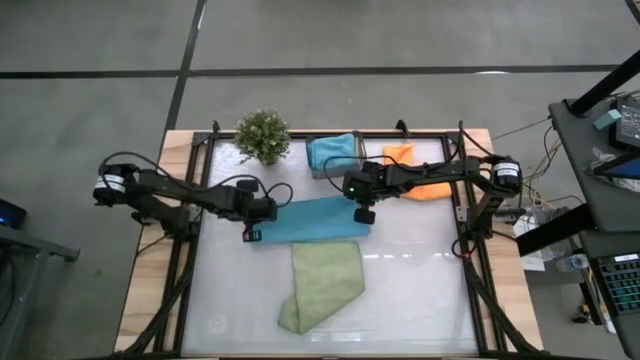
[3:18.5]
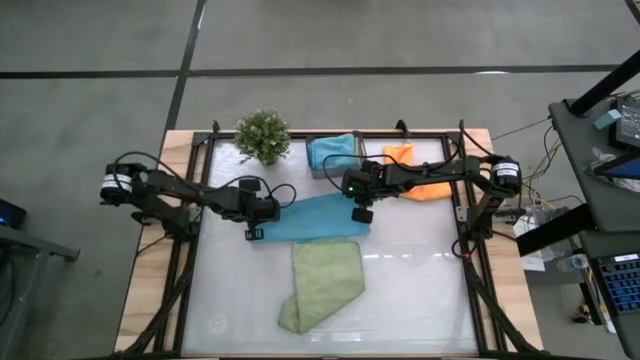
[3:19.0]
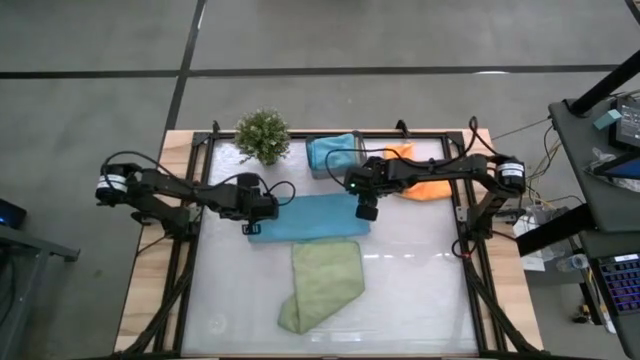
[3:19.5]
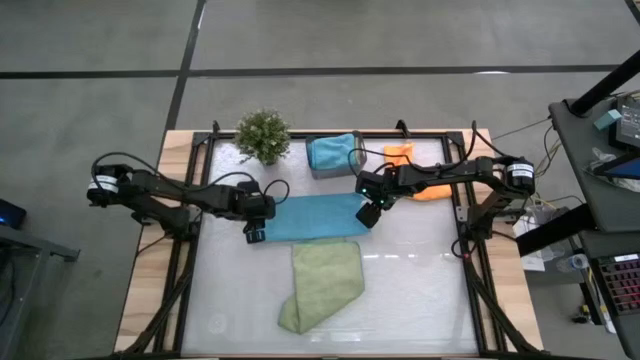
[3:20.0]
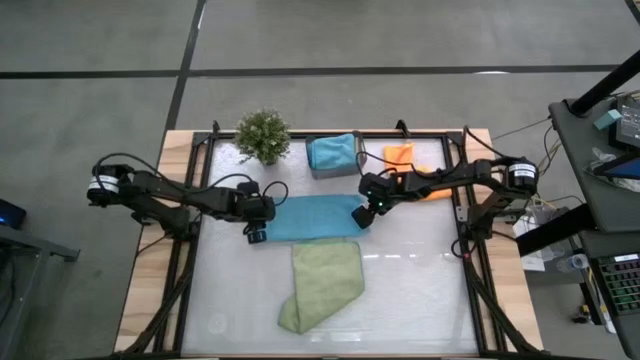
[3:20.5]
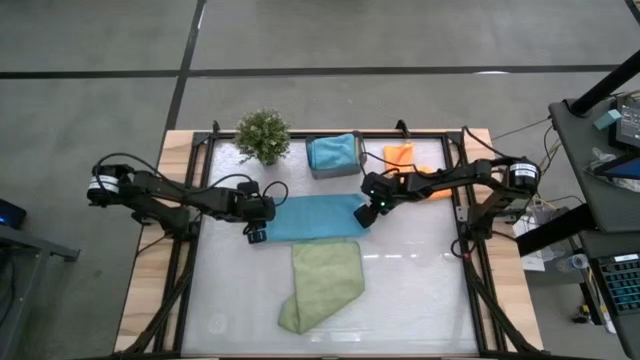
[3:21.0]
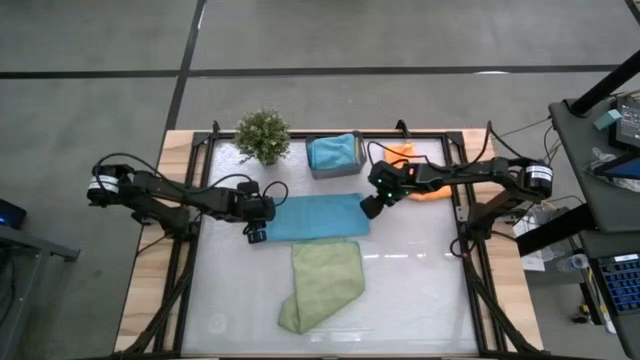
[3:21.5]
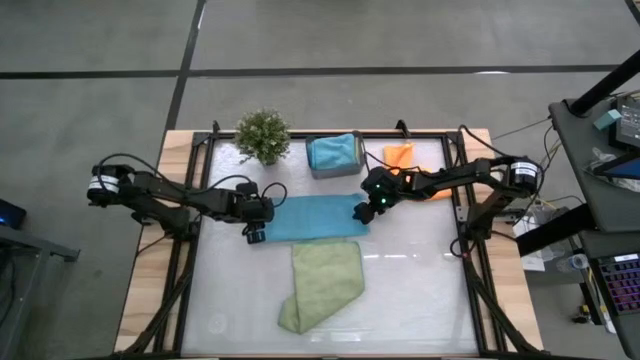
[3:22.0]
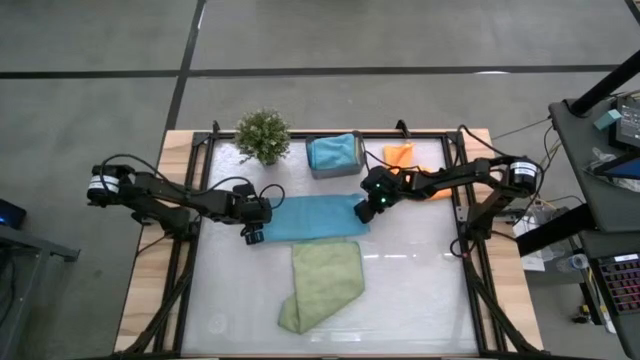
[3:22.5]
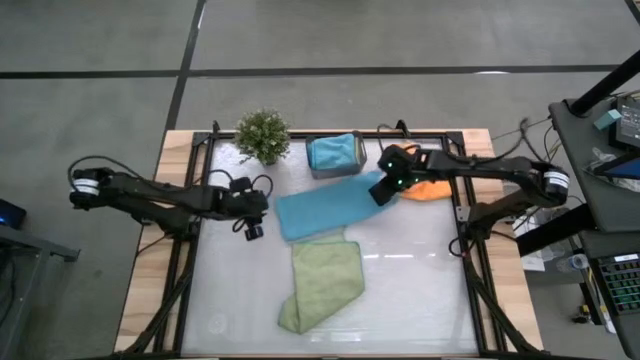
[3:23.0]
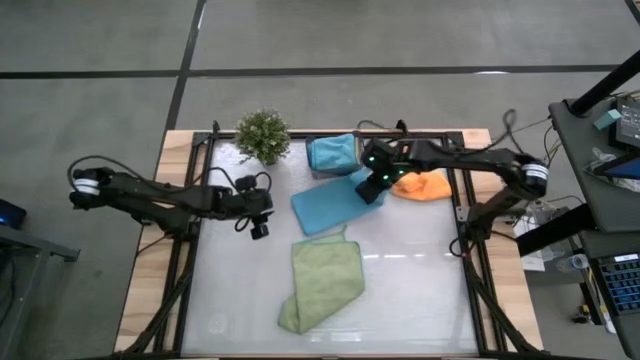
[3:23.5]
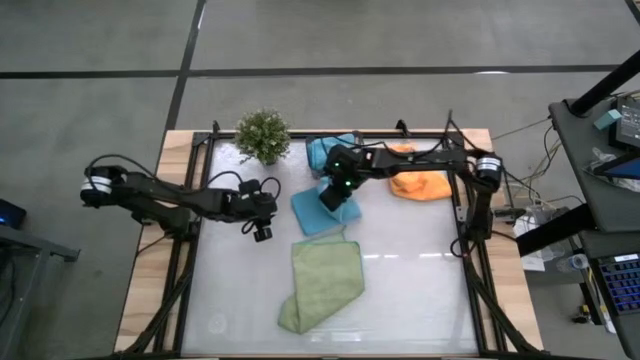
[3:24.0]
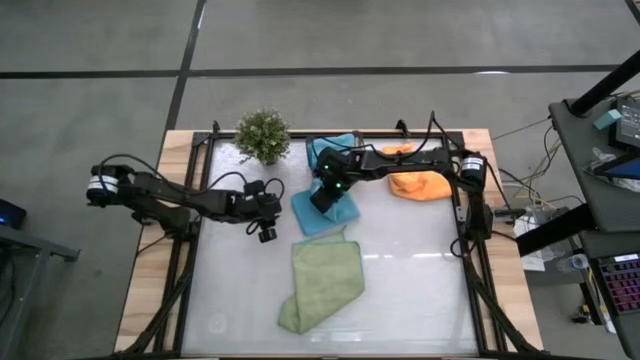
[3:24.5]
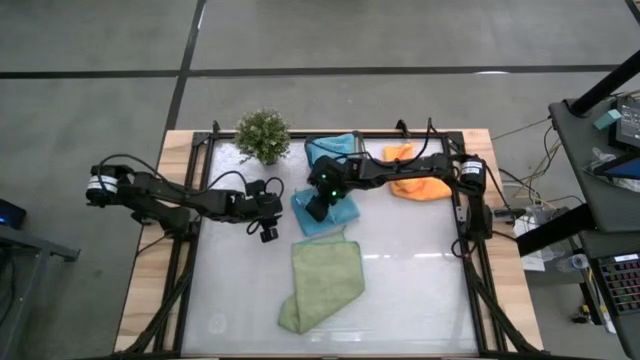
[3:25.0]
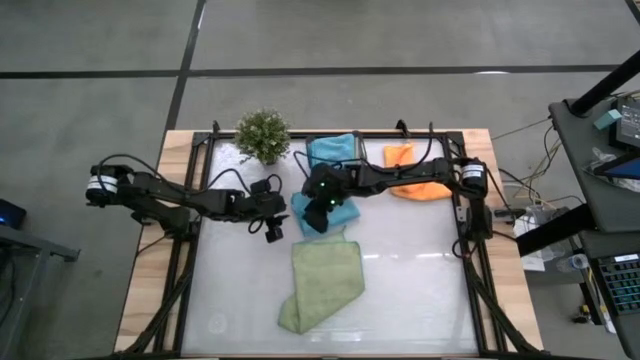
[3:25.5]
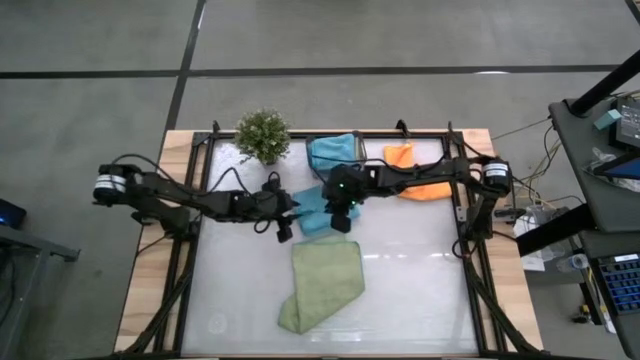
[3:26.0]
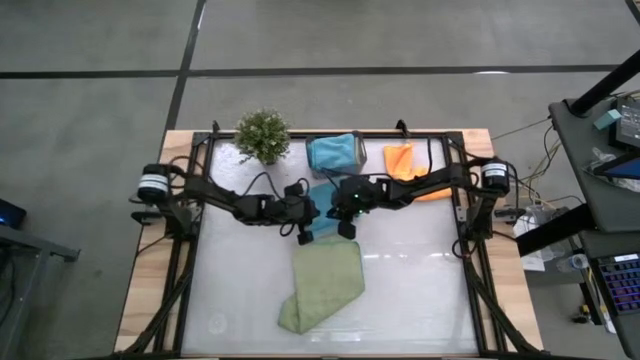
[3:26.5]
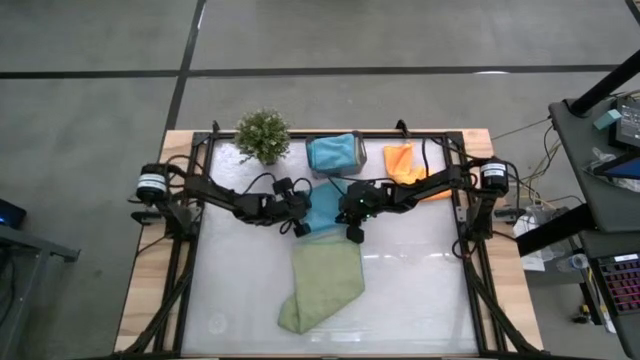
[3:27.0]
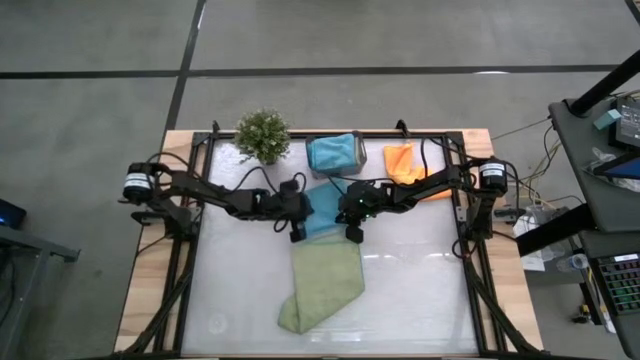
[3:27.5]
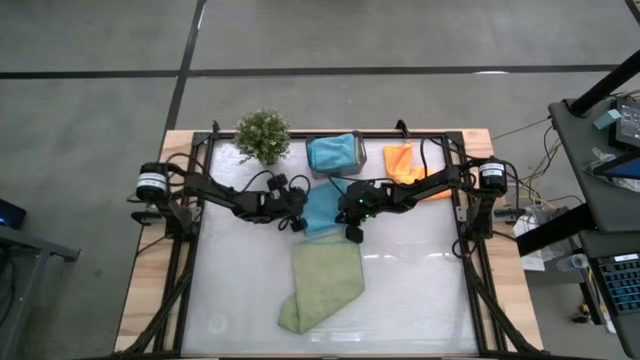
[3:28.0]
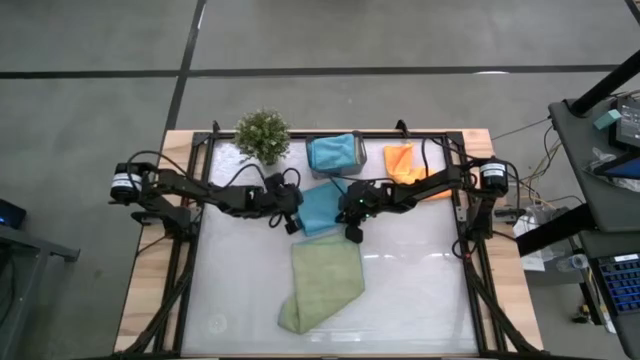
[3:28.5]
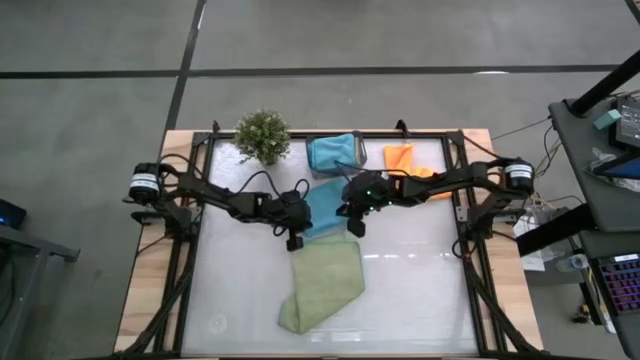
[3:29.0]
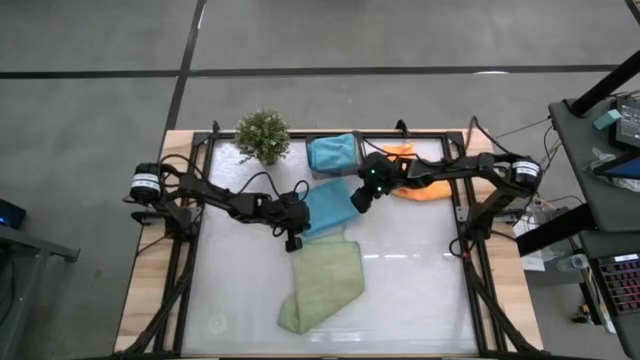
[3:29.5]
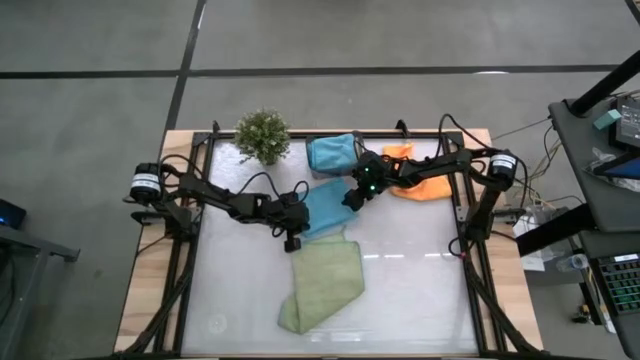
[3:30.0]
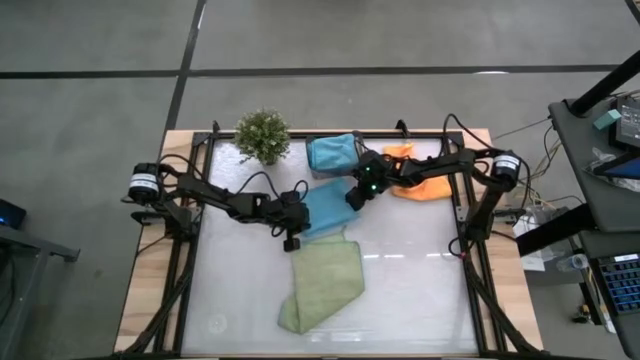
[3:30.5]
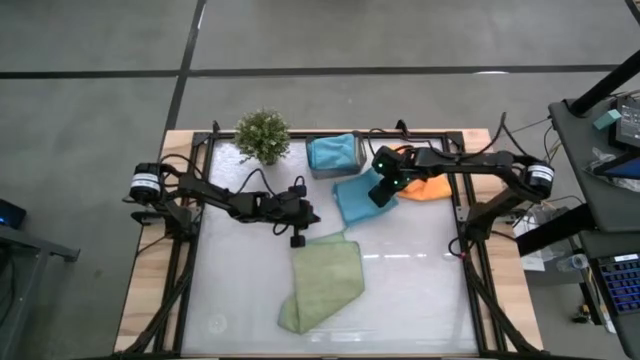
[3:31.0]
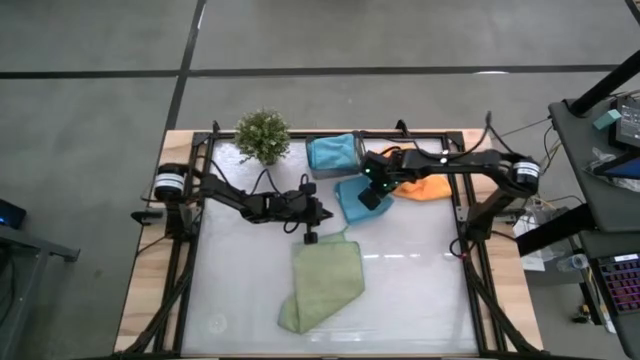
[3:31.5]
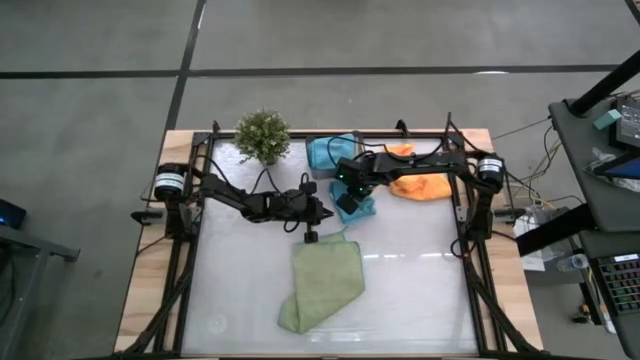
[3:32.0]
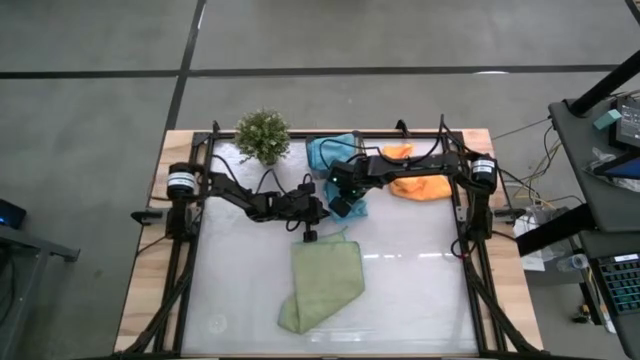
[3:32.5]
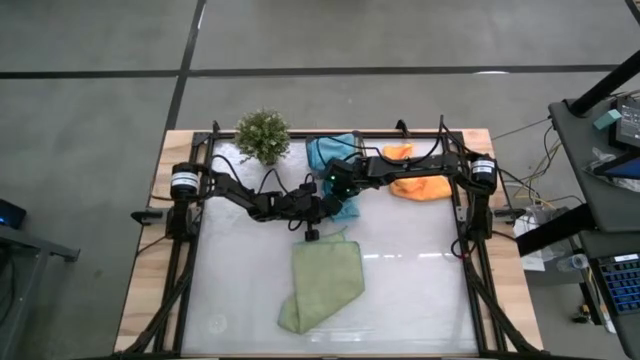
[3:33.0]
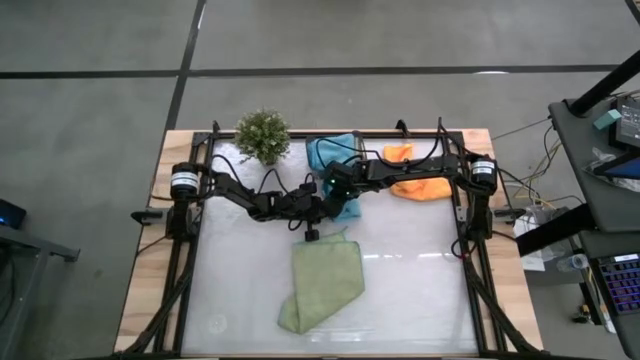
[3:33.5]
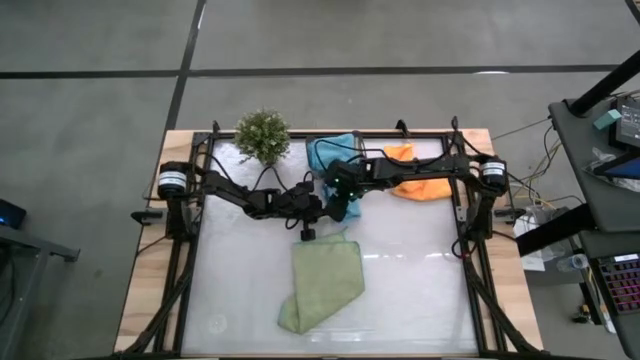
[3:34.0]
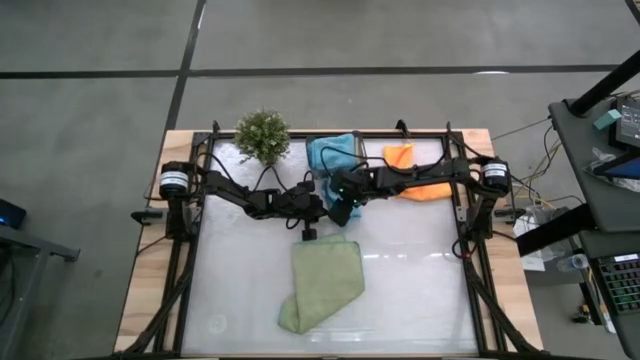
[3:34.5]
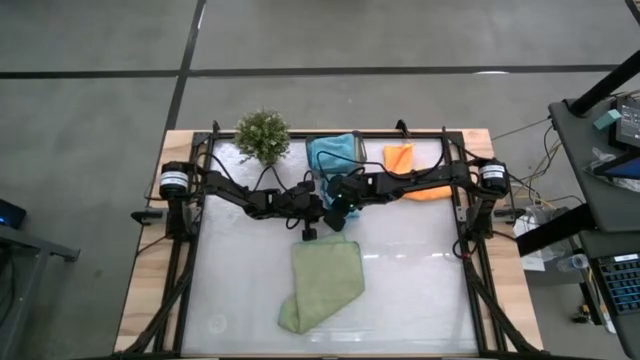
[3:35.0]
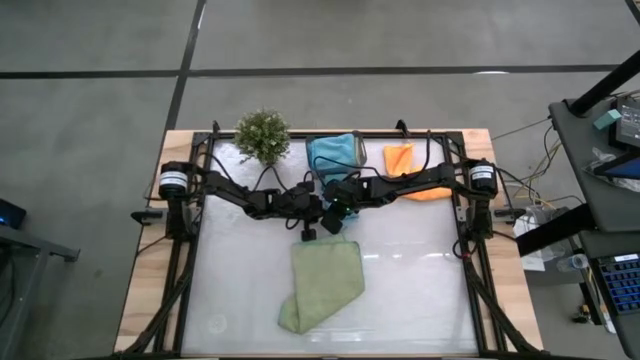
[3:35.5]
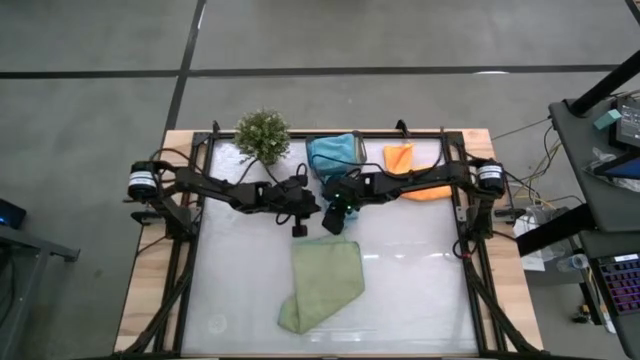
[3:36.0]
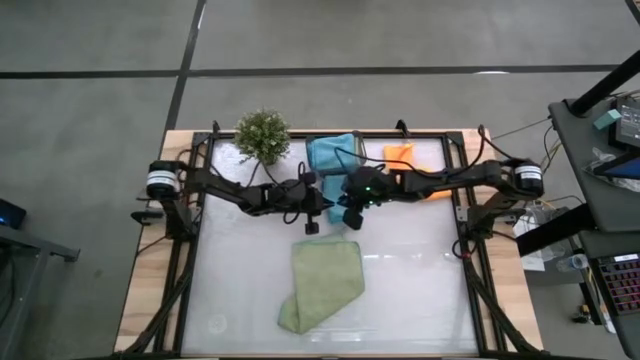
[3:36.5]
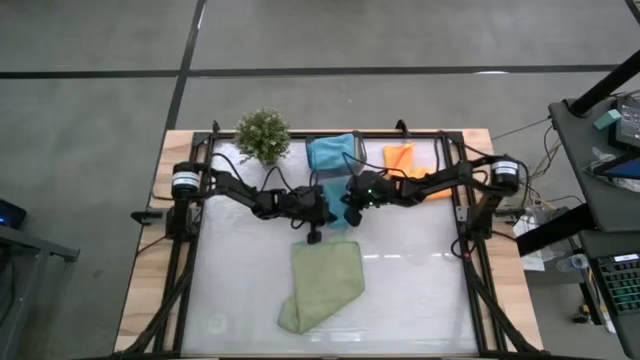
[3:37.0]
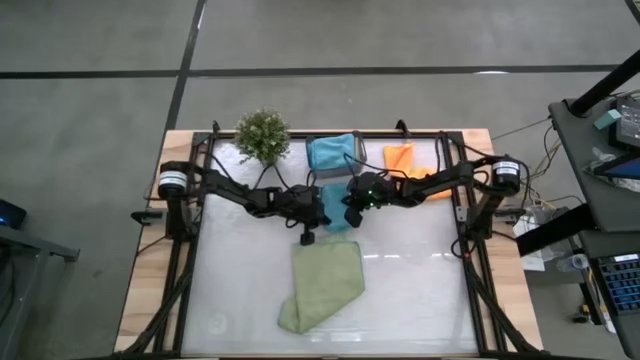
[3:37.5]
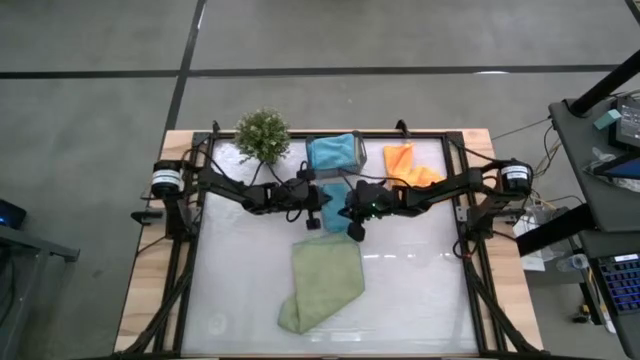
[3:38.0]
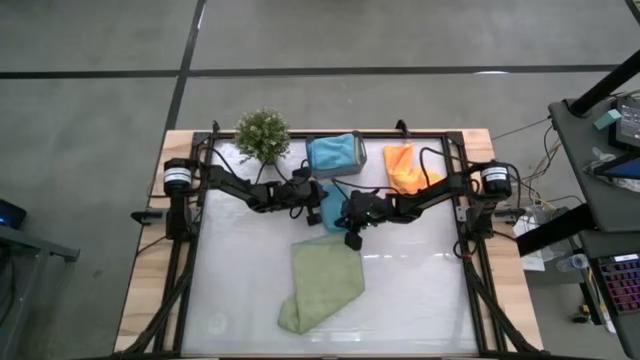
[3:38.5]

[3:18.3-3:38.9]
Task: Fold microfiber towels
Fold the blue towel

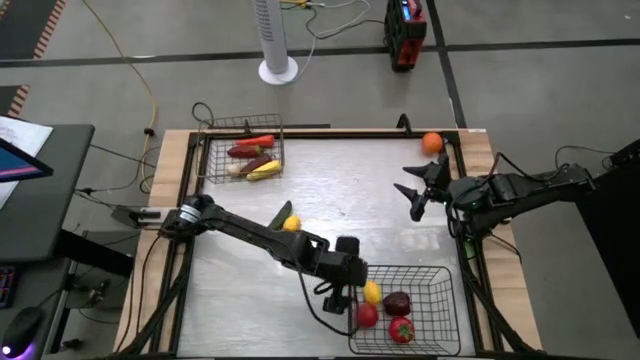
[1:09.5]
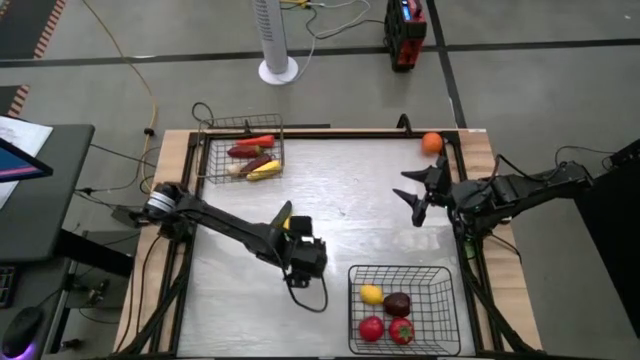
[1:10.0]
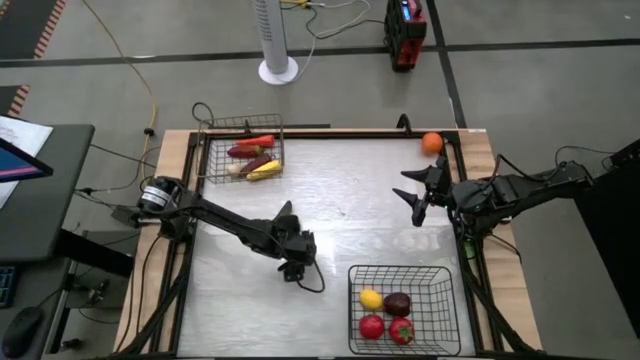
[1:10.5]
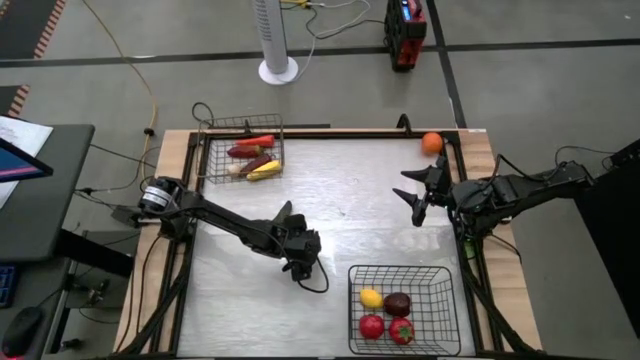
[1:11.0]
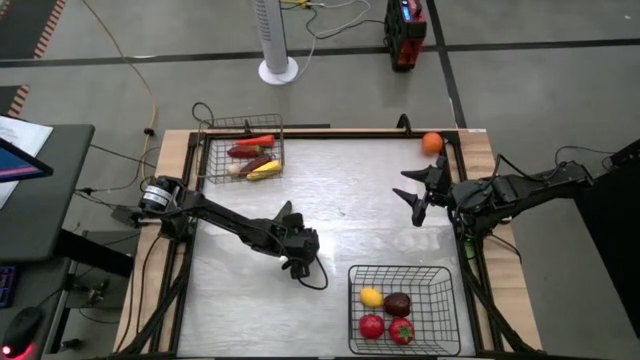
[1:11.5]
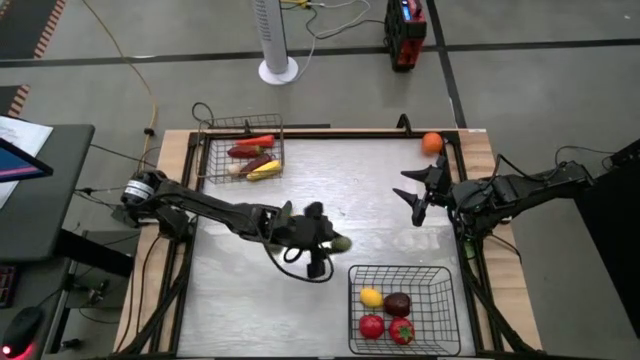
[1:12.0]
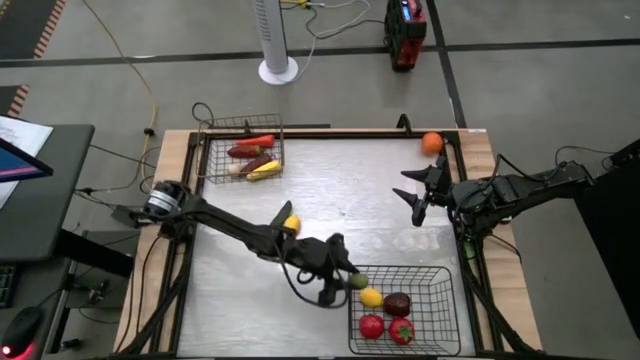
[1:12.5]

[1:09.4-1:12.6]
Task: Sort produce into baskets
Put the right lime into the bottom wire basket
